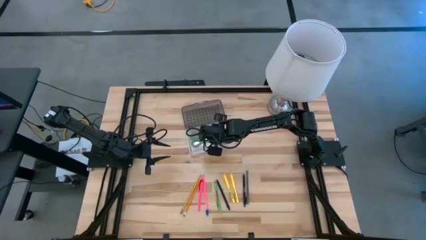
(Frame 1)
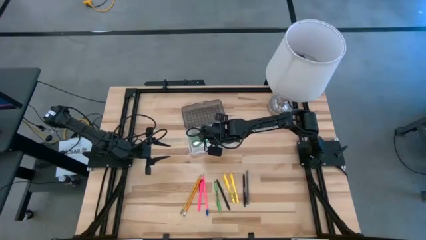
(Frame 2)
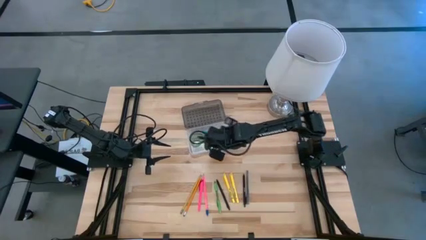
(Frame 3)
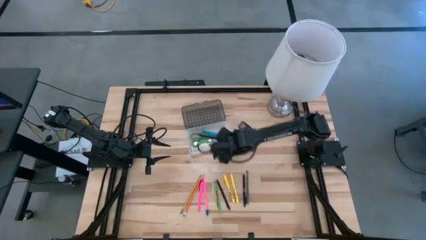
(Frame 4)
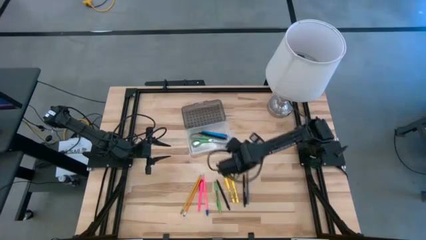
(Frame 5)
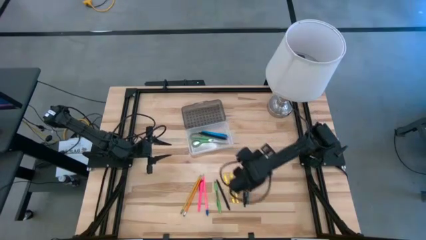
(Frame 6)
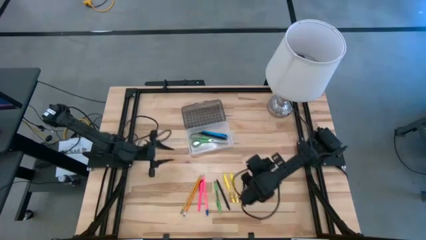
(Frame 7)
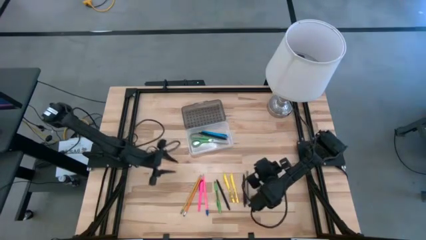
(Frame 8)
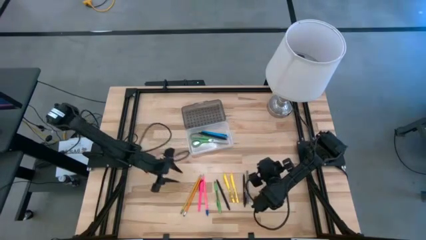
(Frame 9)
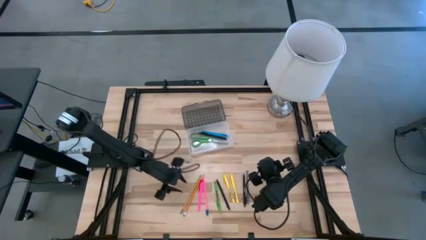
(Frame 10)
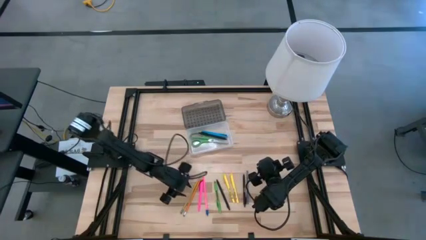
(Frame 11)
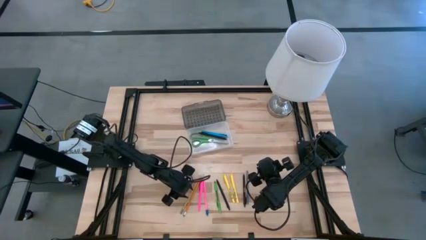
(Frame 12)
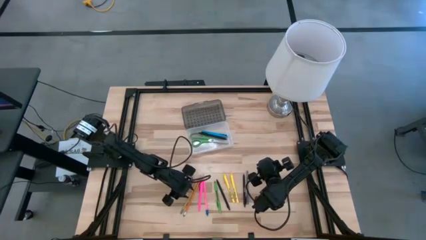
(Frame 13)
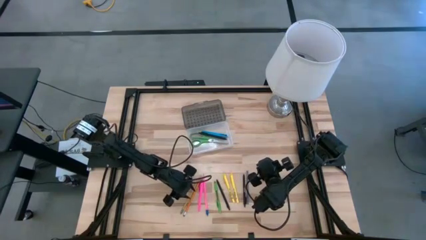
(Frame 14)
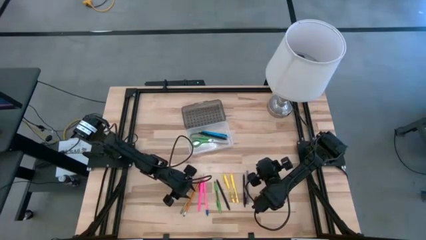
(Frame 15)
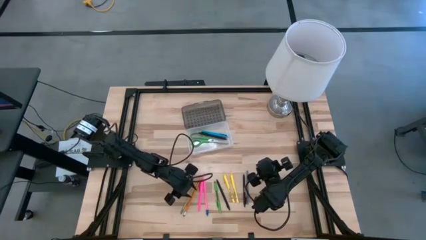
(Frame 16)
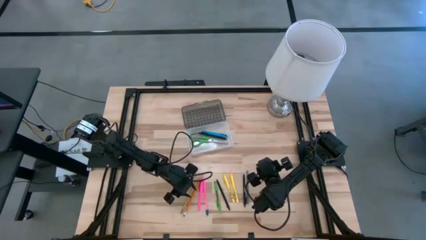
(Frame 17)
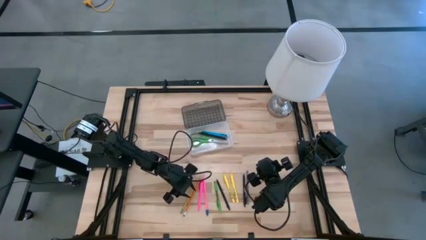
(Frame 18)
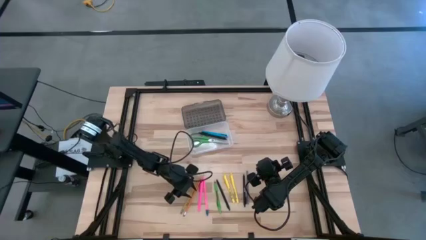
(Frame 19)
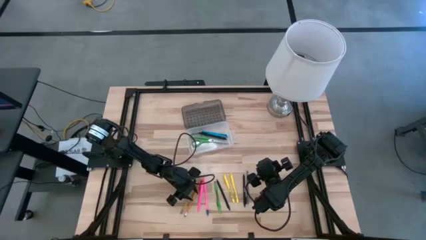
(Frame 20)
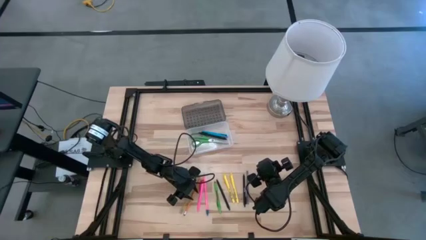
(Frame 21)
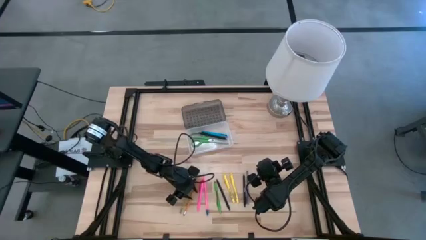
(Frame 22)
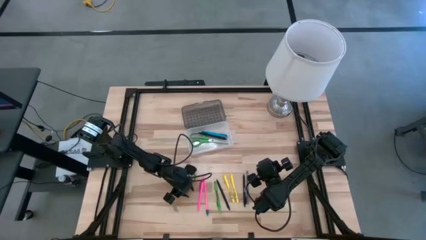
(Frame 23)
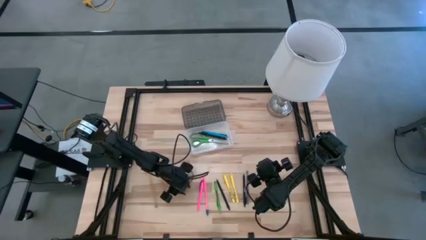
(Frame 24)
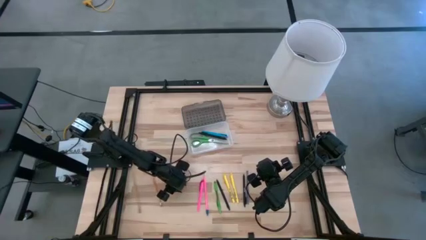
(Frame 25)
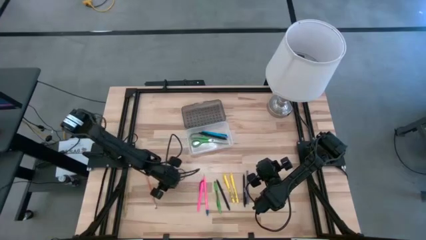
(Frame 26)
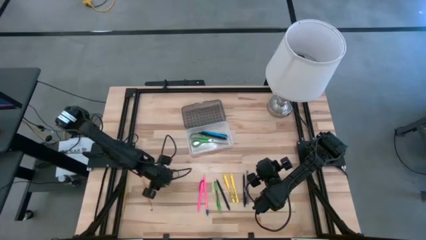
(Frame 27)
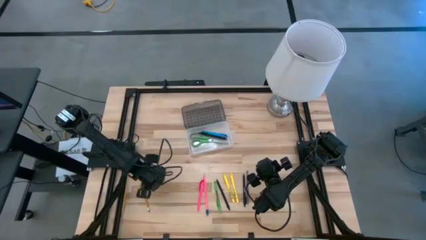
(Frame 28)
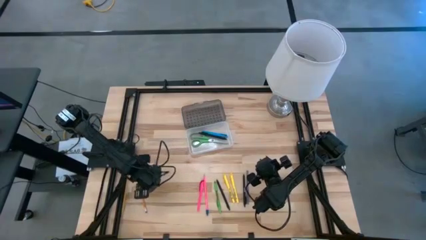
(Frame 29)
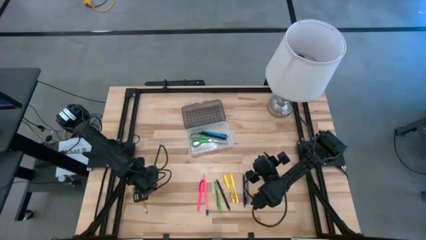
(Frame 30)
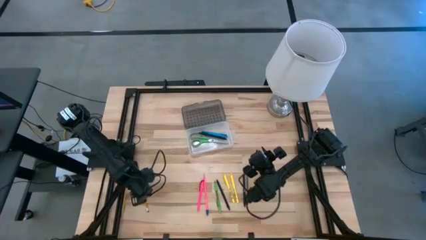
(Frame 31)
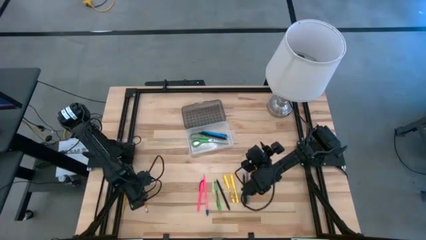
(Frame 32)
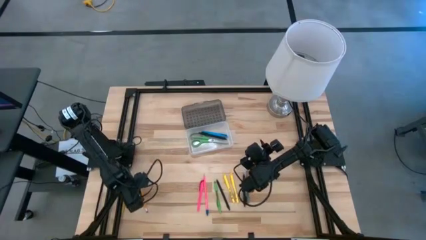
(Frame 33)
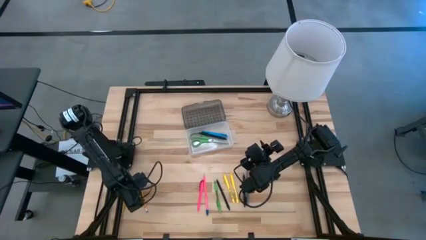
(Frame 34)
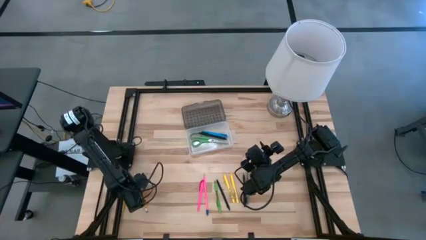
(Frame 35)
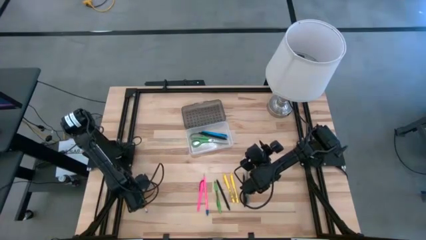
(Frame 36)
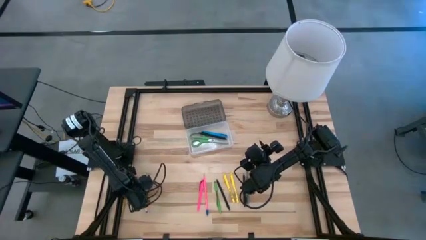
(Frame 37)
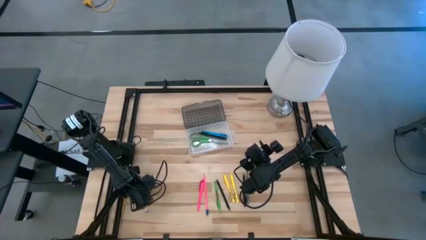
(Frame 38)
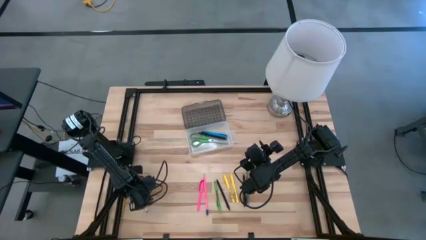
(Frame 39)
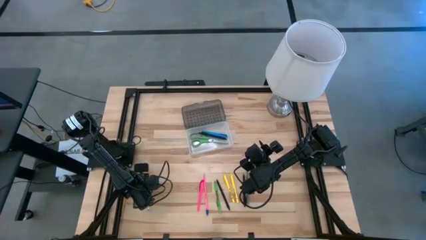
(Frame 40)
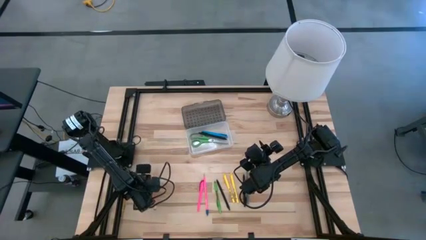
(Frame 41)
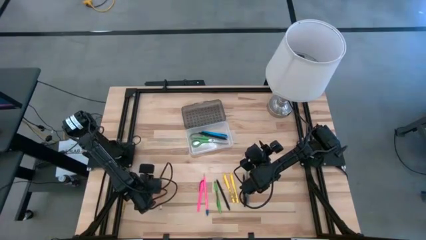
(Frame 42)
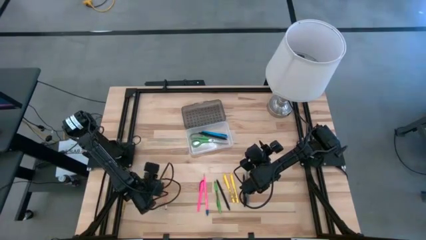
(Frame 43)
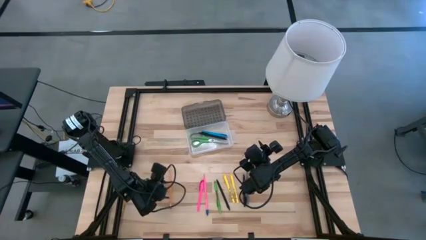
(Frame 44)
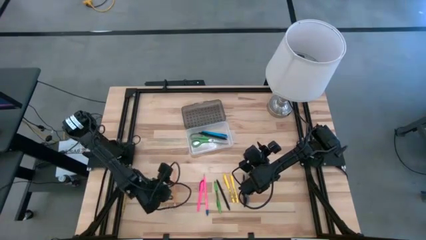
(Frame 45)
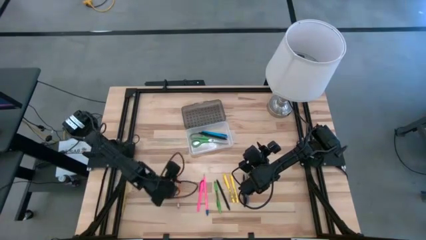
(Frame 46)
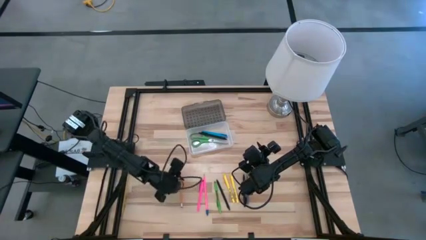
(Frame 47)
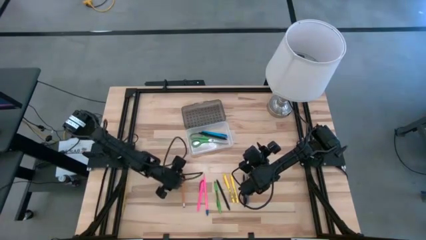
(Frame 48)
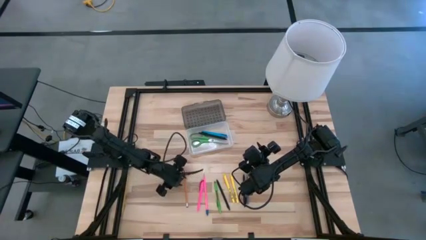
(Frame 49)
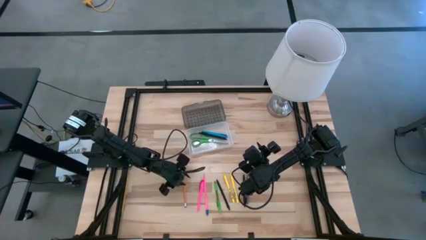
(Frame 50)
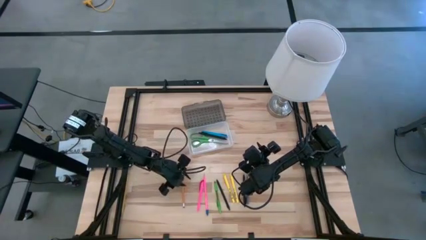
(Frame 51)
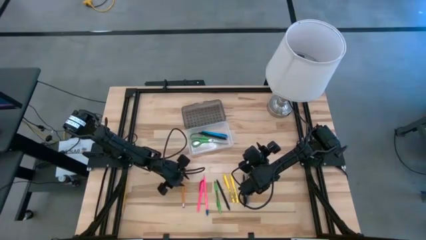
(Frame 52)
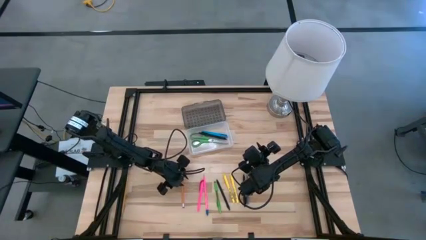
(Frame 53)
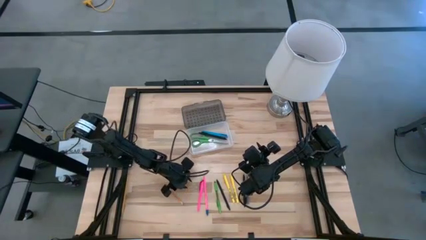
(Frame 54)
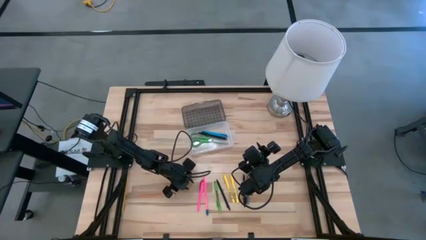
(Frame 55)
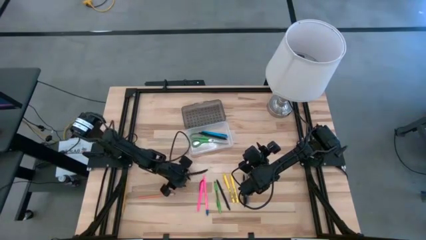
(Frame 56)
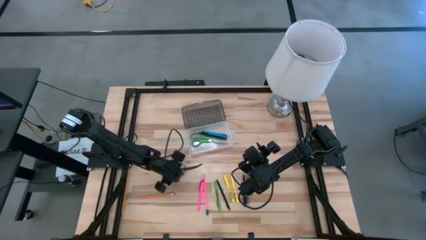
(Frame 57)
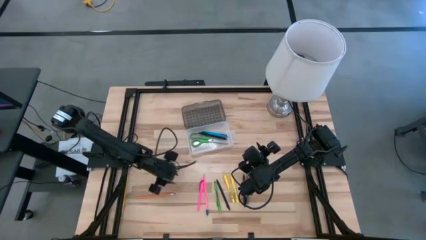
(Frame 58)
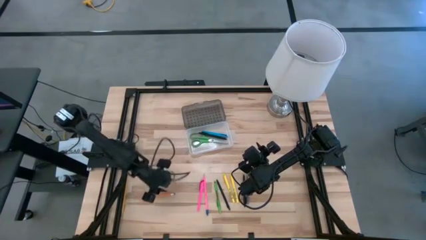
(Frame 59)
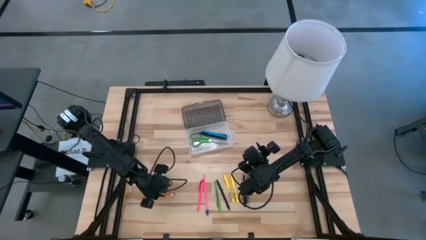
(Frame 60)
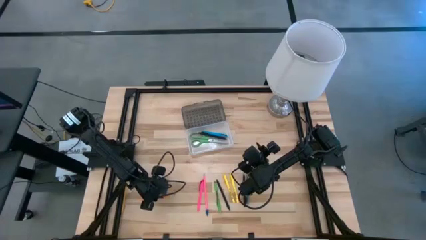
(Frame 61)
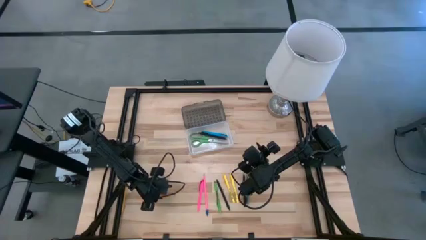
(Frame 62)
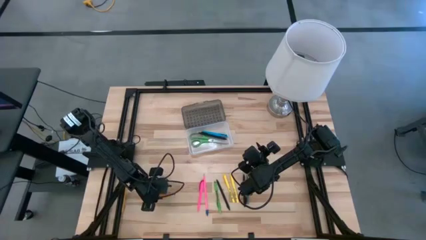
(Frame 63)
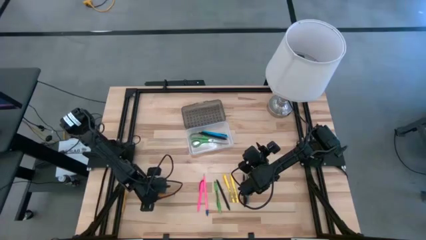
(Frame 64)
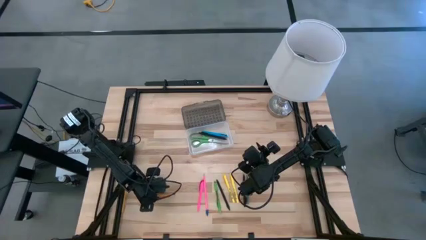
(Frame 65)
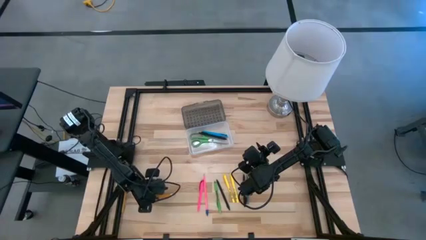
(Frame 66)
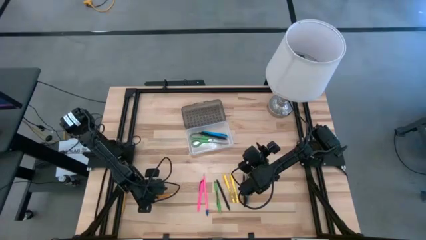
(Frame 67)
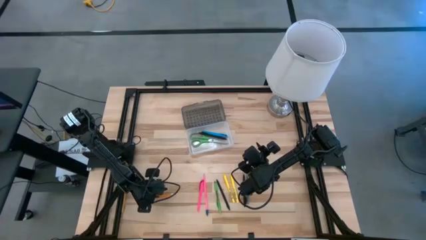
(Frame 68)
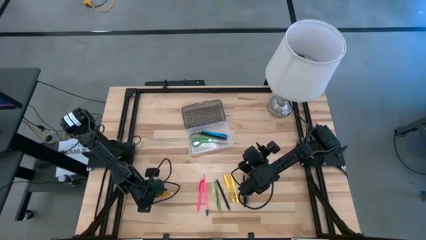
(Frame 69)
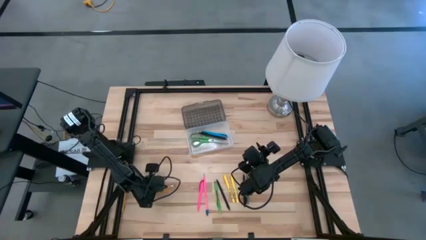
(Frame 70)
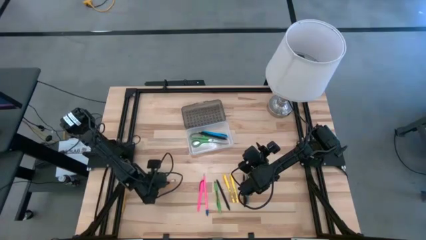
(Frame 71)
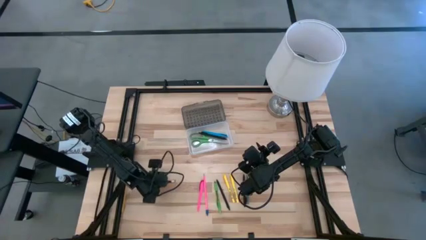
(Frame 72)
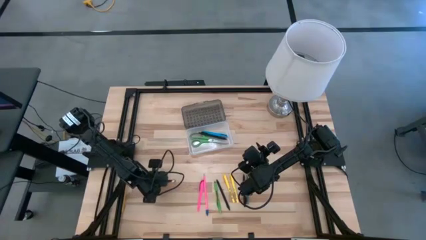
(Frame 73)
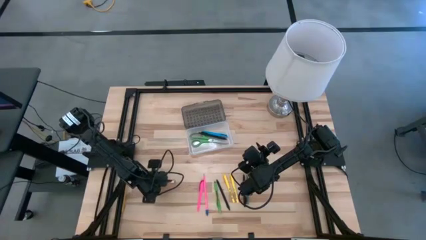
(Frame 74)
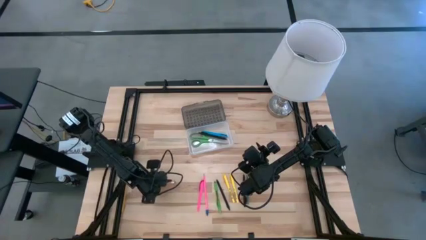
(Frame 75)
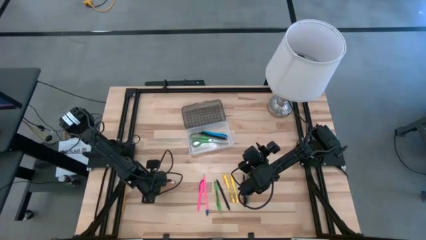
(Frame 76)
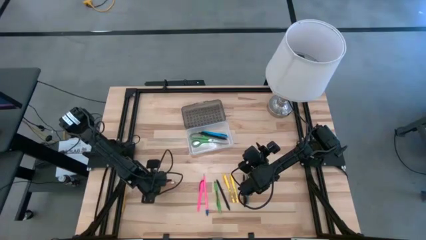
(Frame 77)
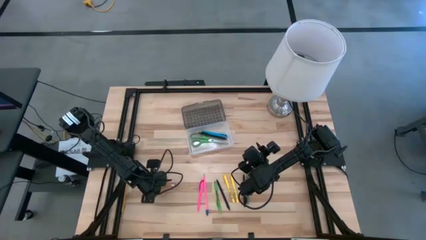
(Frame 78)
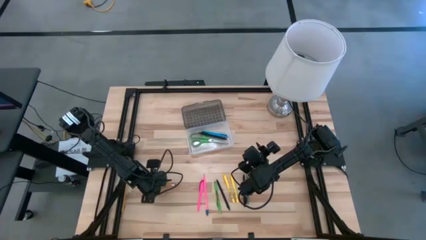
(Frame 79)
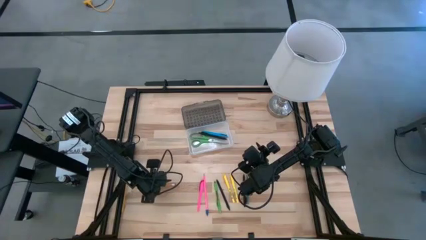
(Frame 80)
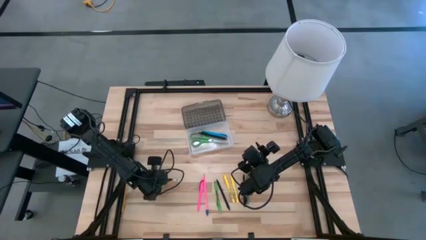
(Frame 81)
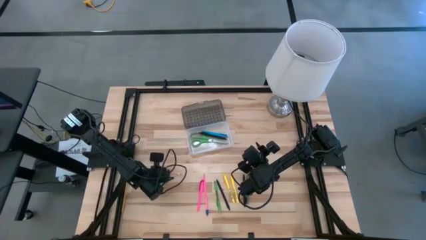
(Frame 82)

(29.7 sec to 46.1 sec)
Task: Pick & place school supplies into a supply box
Put the orange pencil into the transparent supply box
